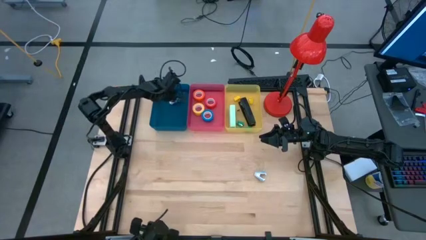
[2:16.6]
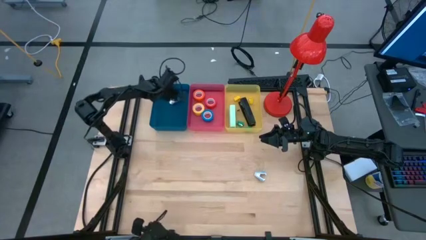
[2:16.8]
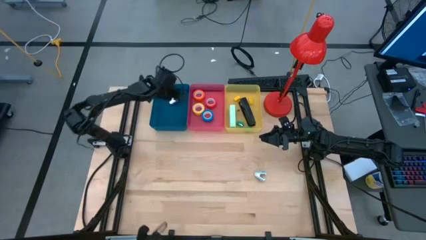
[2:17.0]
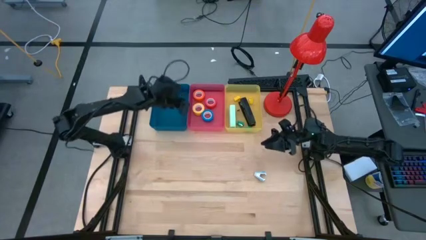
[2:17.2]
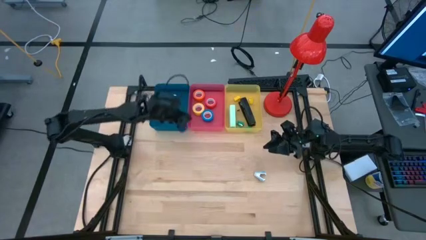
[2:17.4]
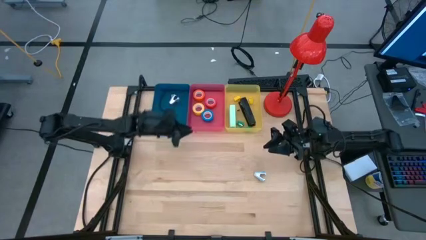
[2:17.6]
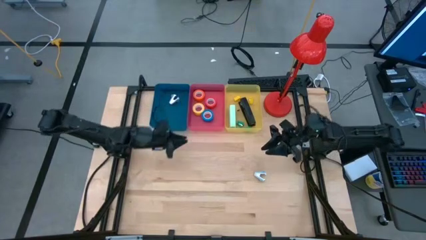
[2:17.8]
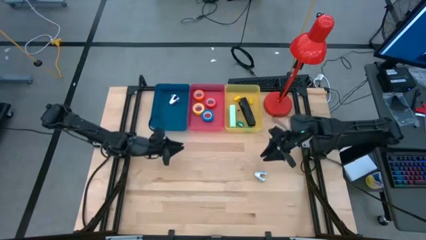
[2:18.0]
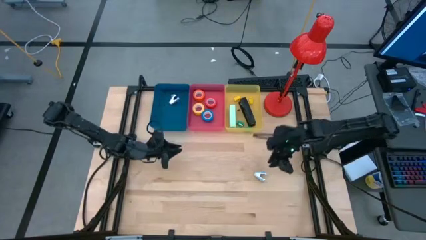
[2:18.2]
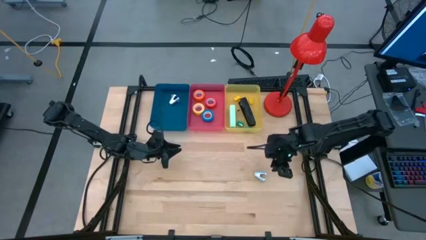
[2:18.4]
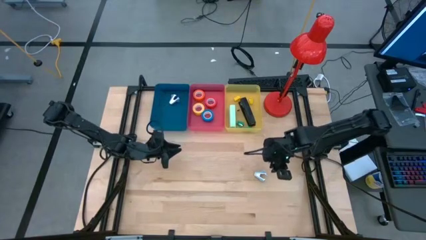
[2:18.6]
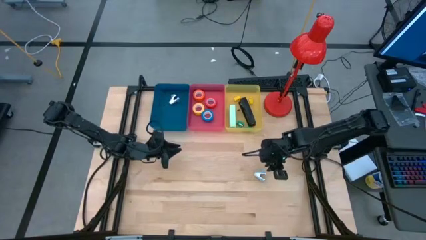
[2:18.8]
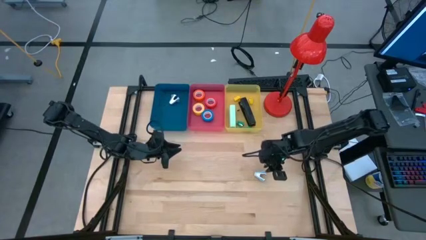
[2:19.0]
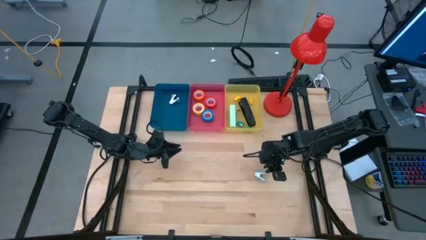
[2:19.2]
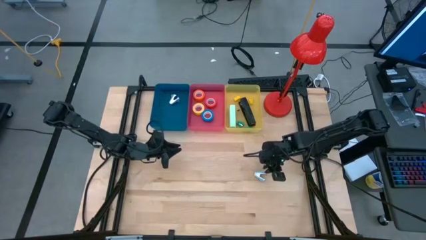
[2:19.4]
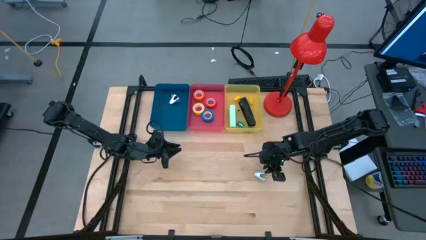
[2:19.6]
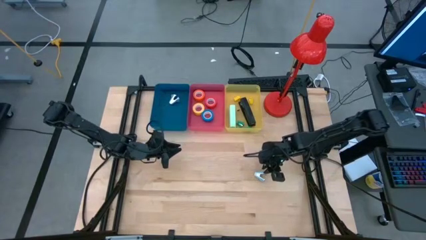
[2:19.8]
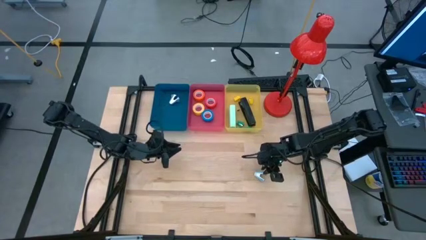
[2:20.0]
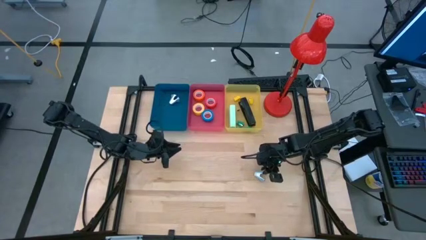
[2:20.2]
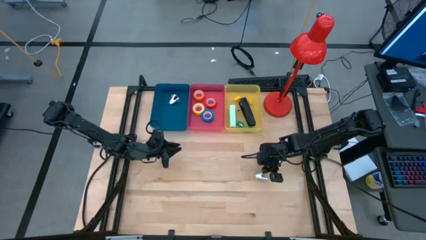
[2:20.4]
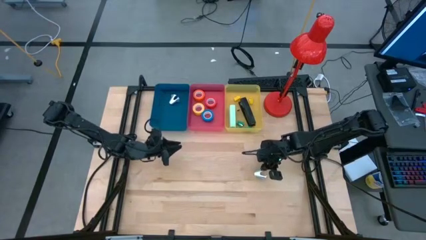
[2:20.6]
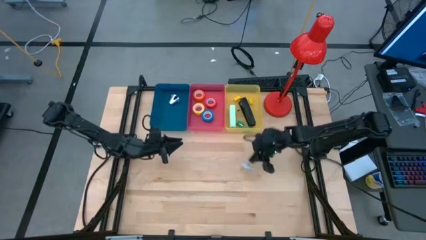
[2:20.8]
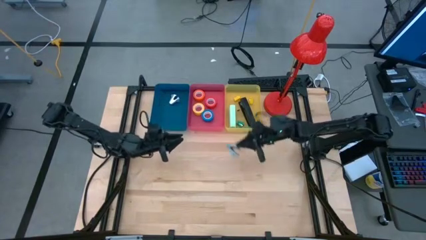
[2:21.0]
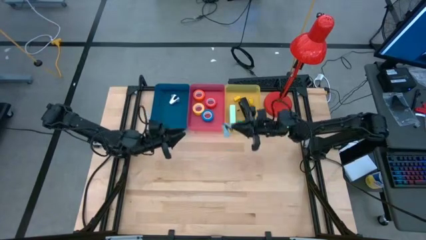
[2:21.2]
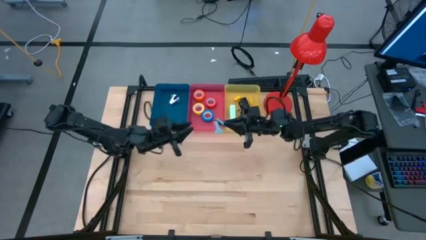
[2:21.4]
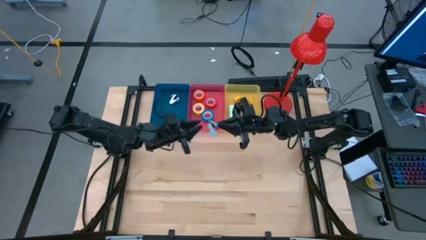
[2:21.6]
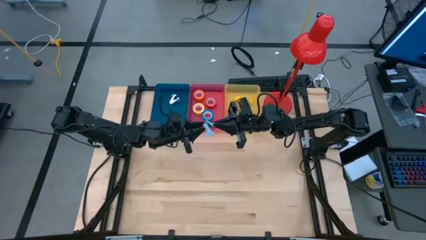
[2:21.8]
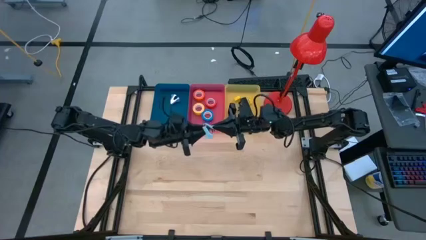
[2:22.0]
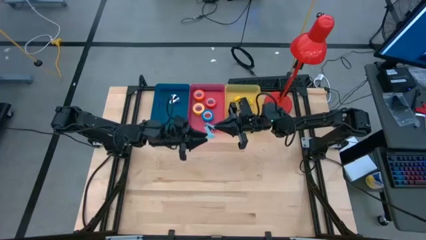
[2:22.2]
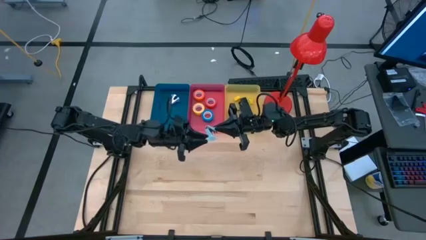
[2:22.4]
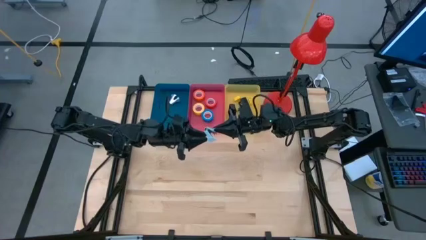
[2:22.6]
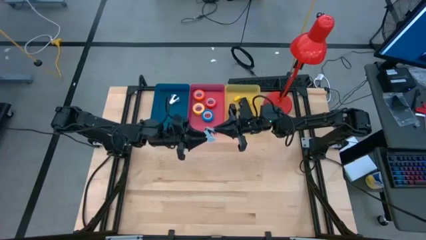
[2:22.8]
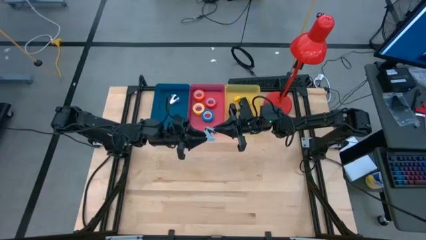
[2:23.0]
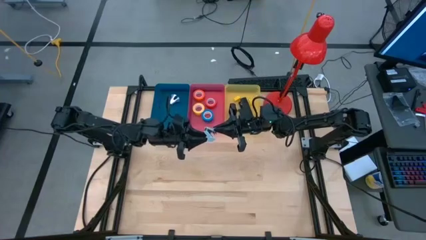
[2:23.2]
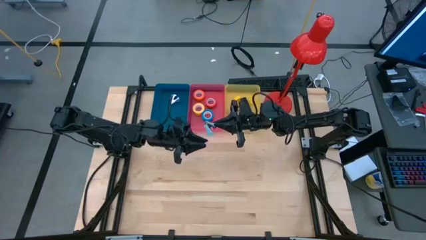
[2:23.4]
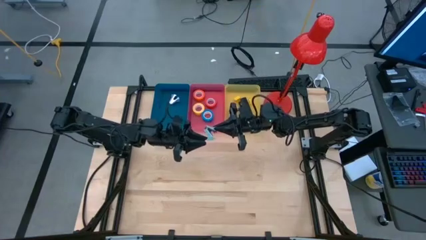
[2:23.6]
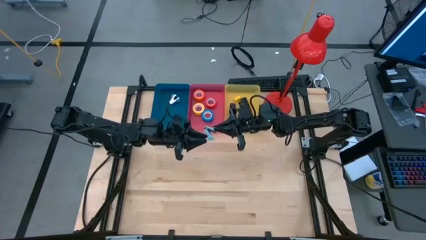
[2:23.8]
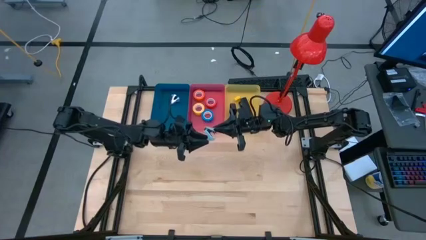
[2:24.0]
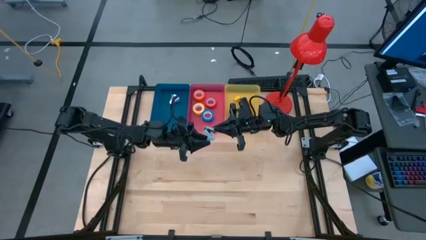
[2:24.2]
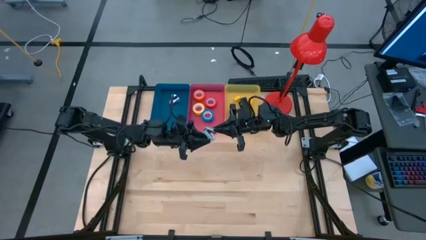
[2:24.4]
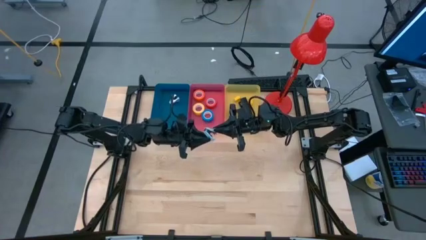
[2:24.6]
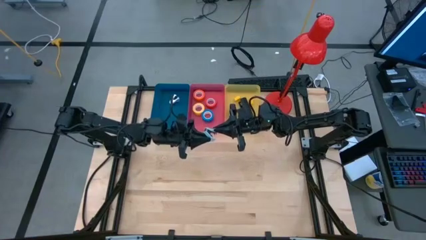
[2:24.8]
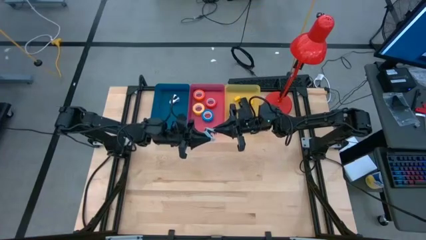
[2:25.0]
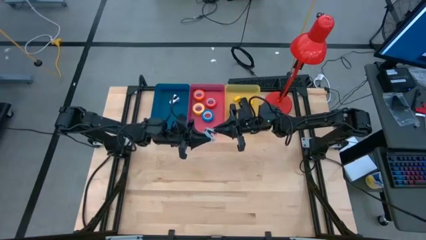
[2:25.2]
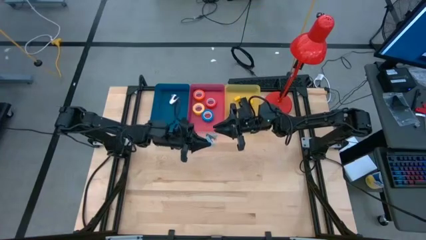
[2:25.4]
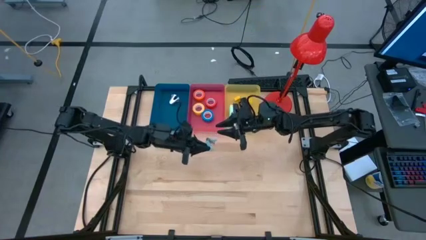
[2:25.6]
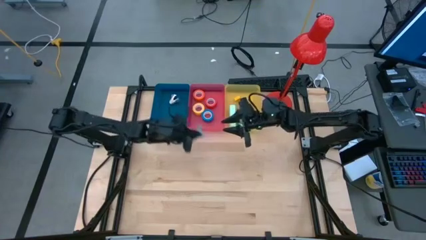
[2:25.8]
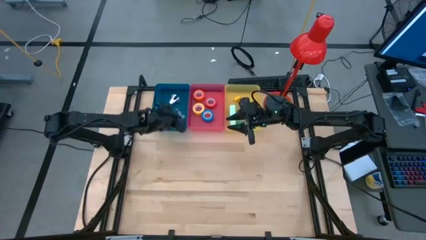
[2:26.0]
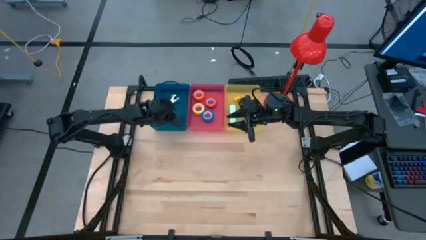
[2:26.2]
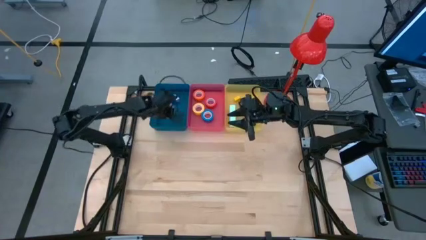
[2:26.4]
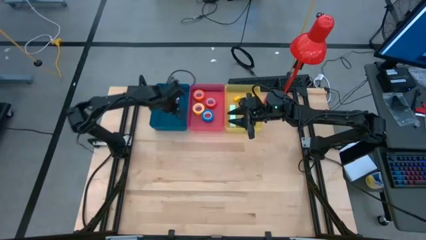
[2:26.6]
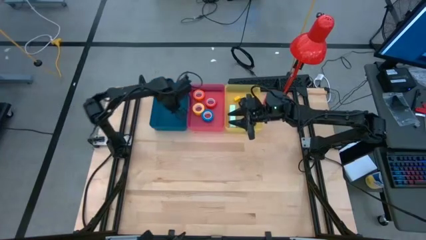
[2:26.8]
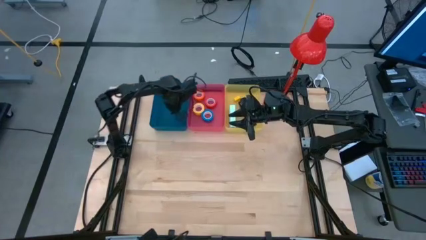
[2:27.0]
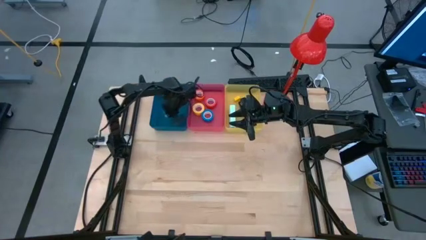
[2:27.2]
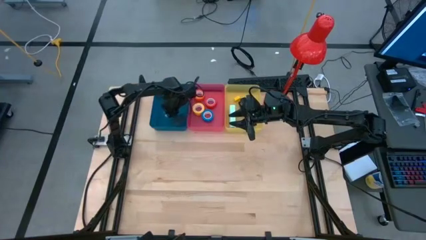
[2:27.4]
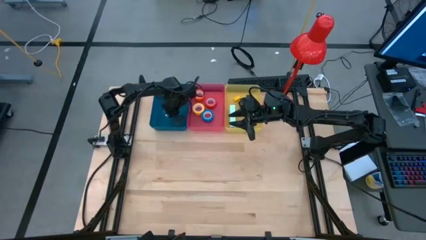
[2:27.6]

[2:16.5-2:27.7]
Task: Pick and place Stapler, Stapler remover, tape
Put the light blue staple remover into the blue bin
